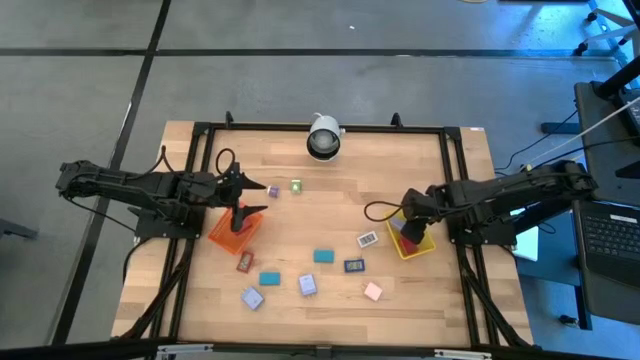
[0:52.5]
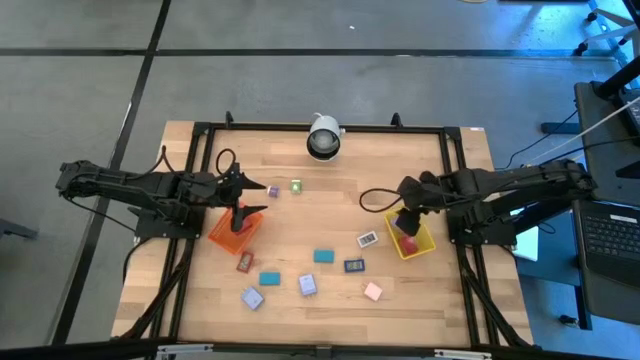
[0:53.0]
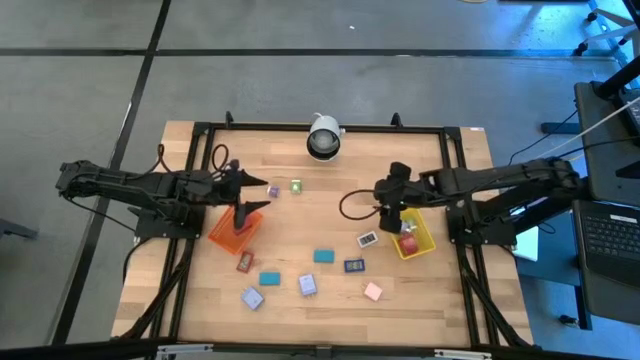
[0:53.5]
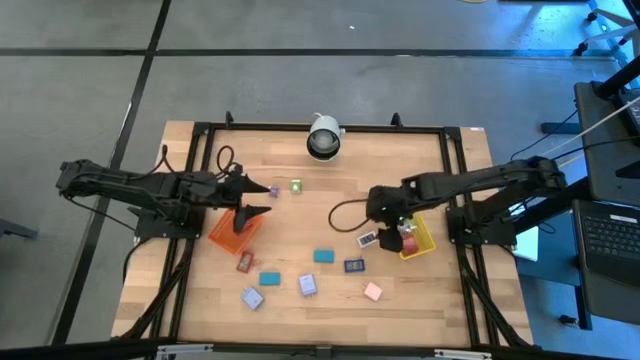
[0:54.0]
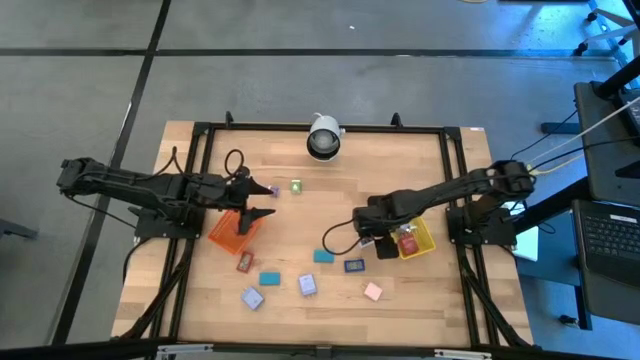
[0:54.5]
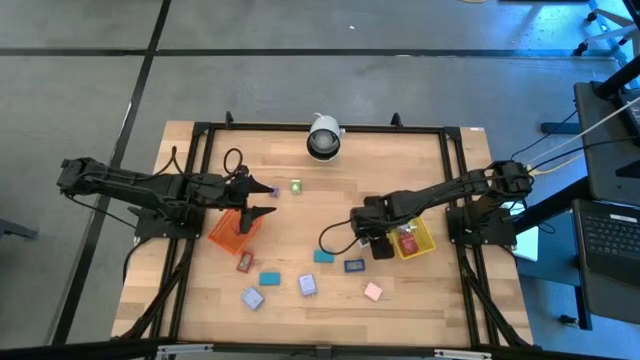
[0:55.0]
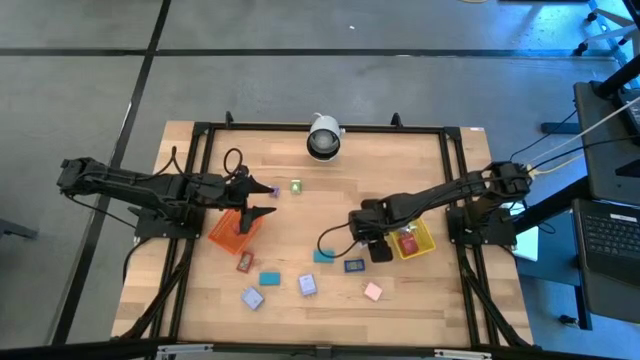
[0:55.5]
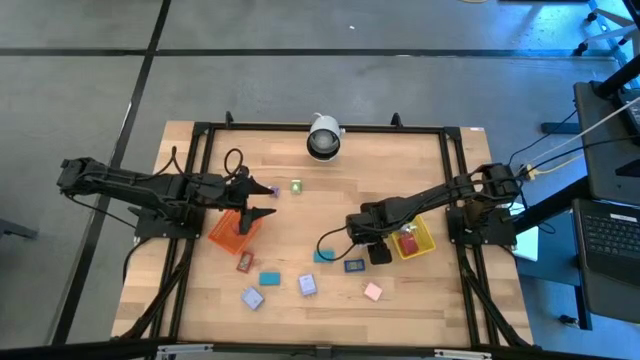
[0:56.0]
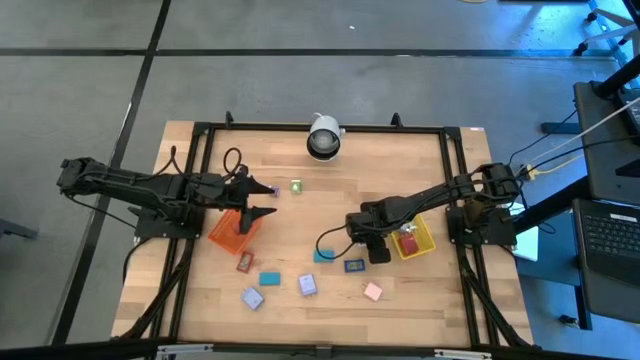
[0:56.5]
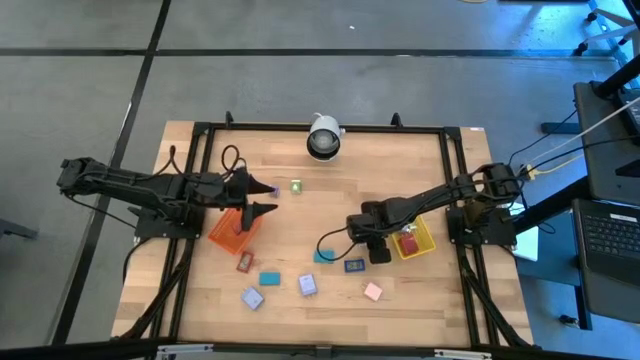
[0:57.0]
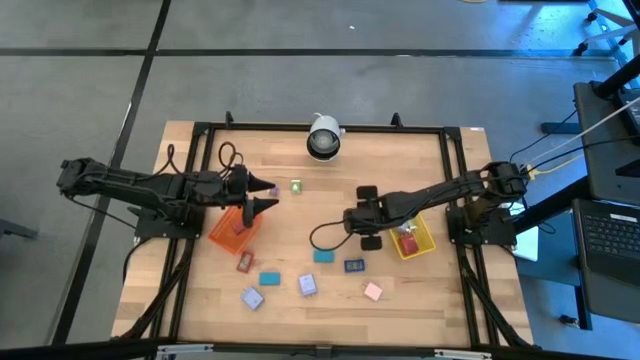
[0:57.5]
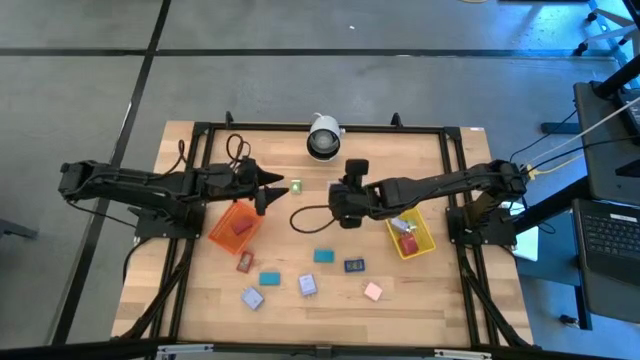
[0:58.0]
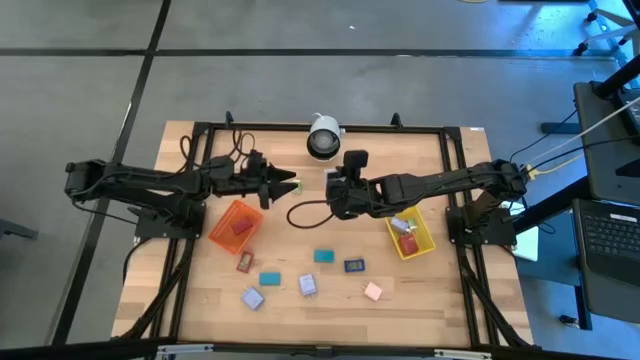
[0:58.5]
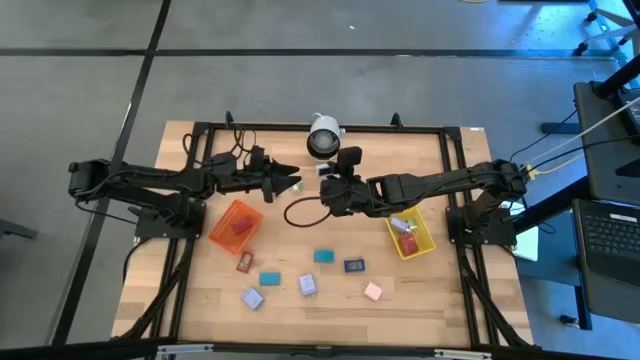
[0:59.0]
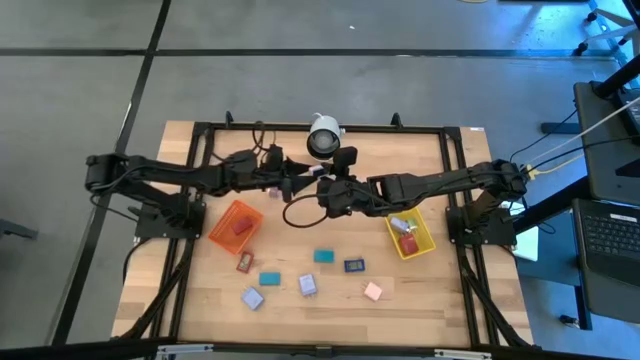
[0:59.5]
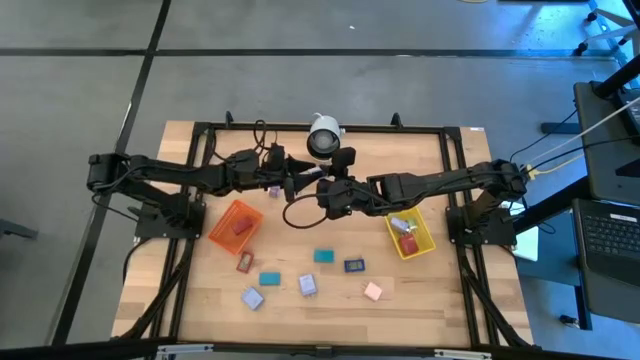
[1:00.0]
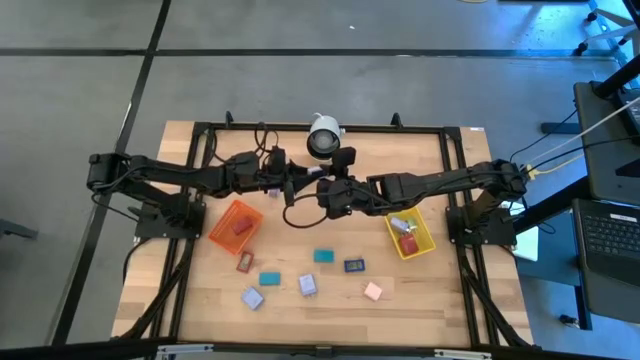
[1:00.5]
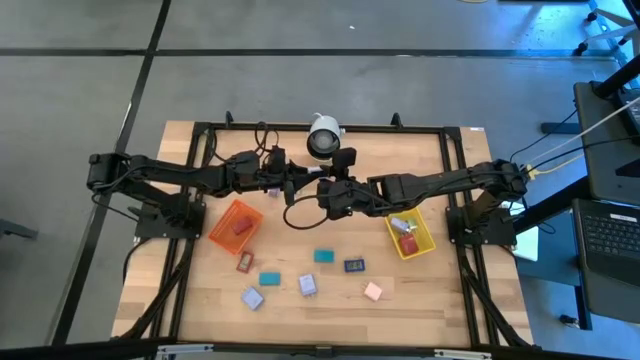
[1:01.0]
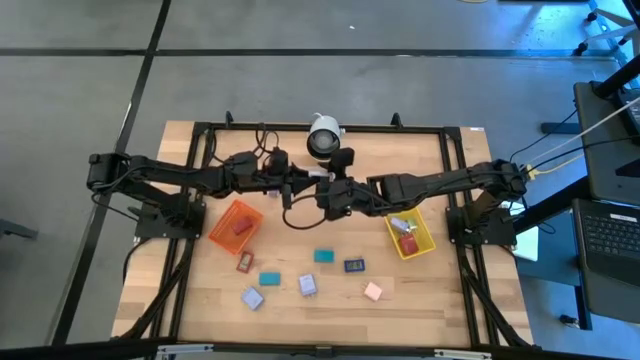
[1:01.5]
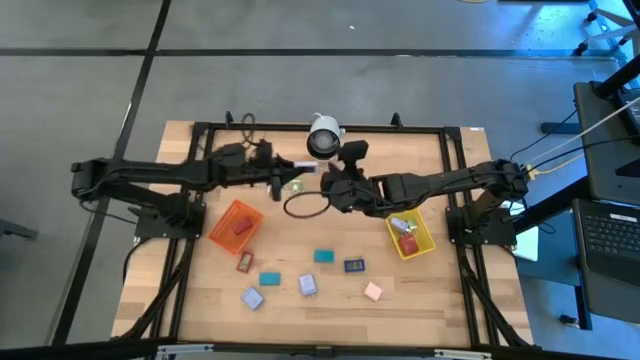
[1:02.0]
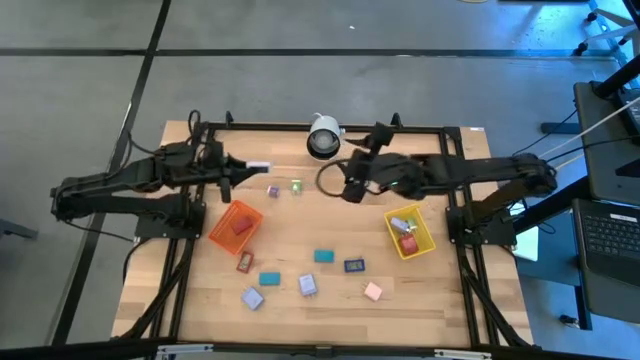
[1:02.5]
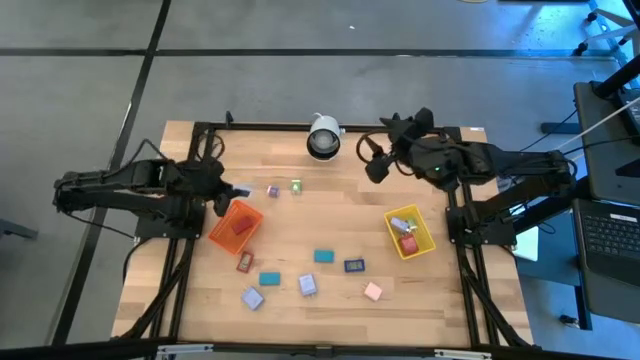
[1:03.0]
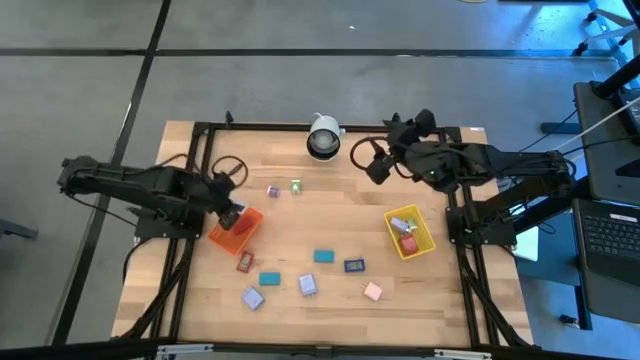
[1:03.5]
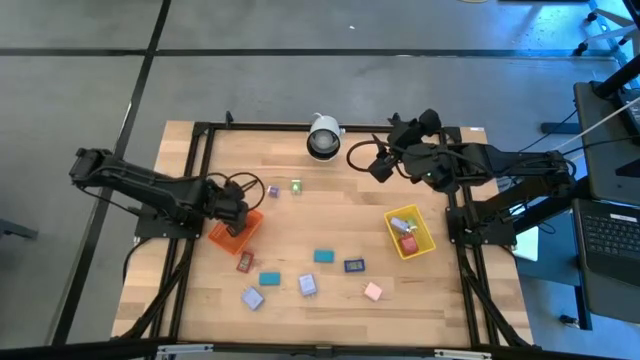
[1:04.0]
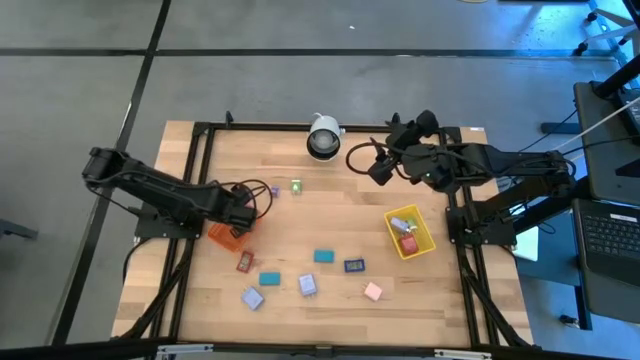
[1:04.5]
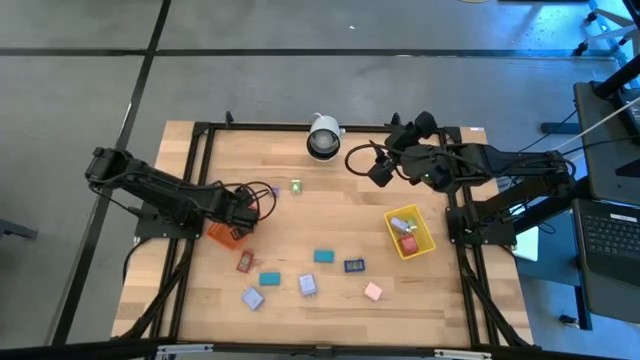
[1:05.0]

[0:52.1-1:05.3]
Task: Pick & Place Office items
Put the white digital clock into the orange basket

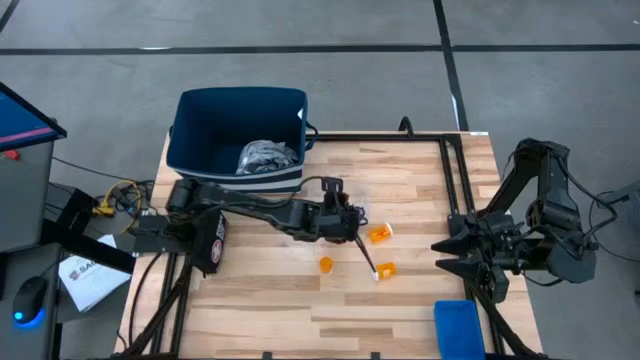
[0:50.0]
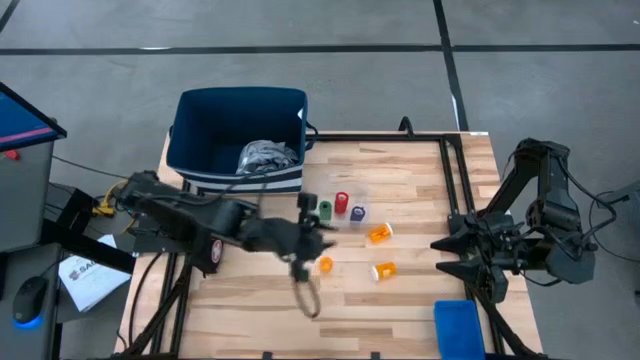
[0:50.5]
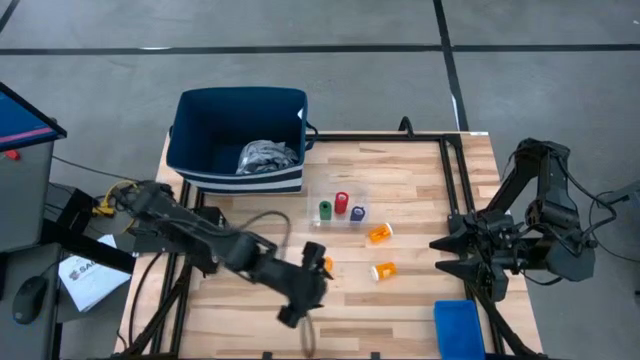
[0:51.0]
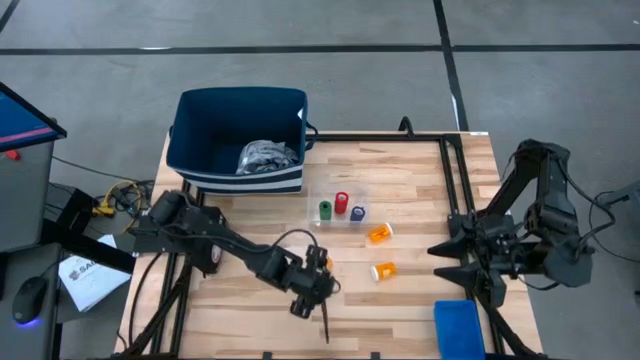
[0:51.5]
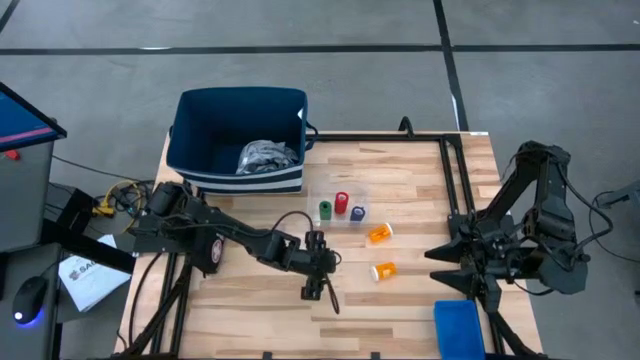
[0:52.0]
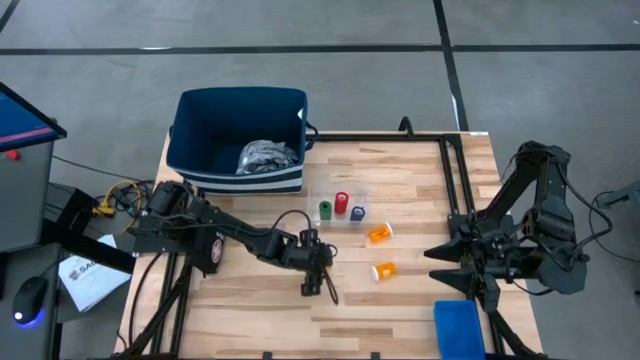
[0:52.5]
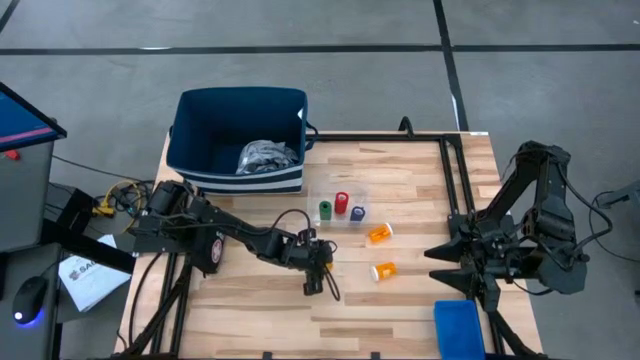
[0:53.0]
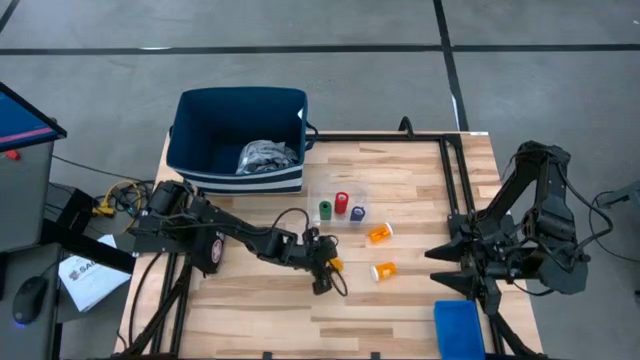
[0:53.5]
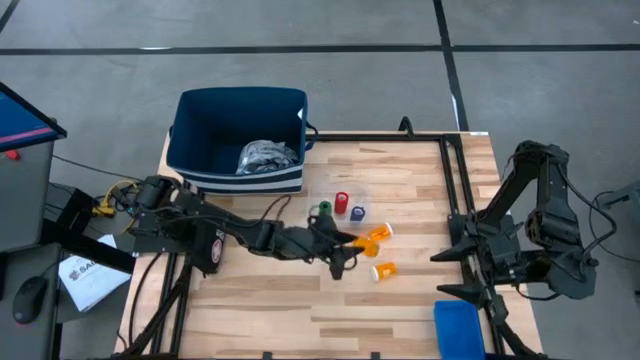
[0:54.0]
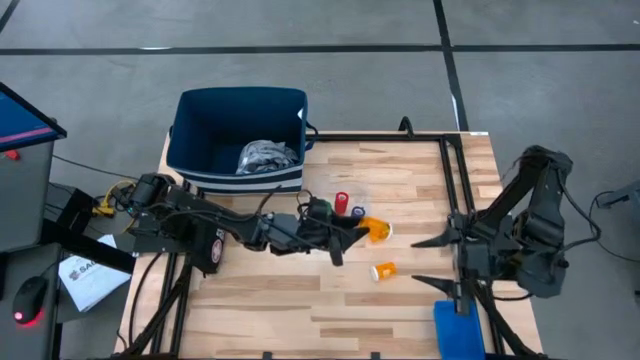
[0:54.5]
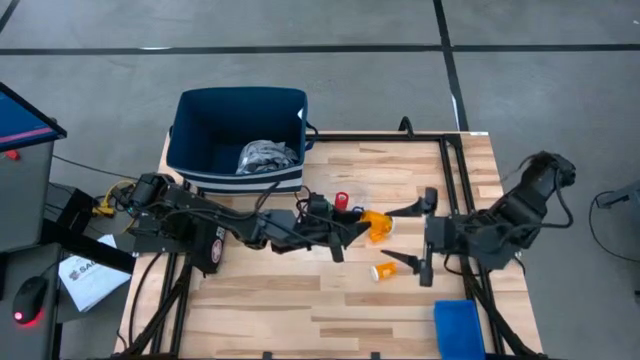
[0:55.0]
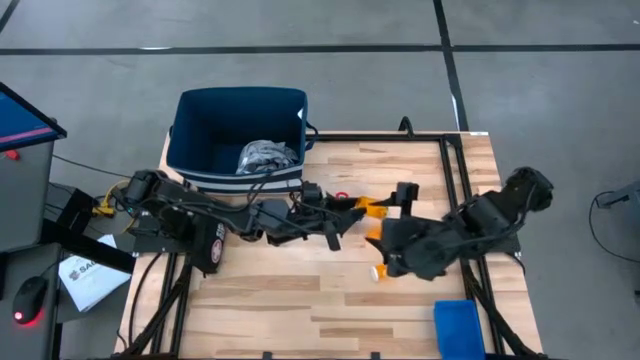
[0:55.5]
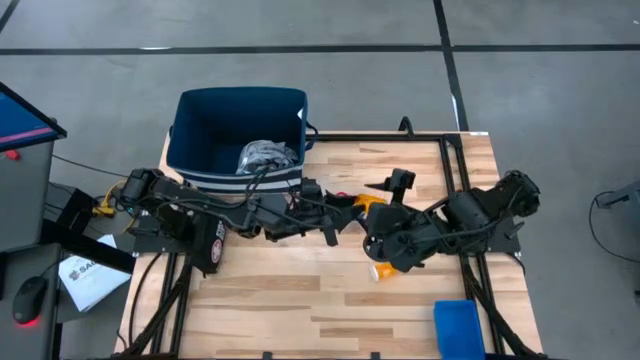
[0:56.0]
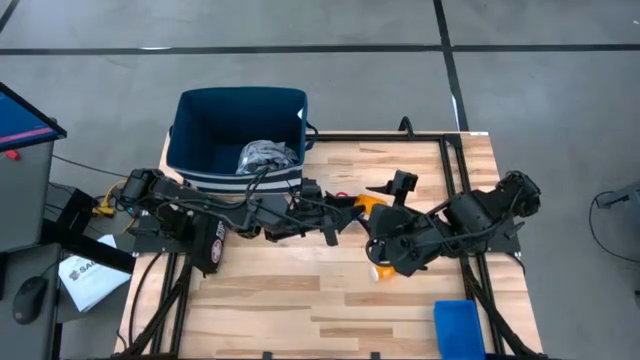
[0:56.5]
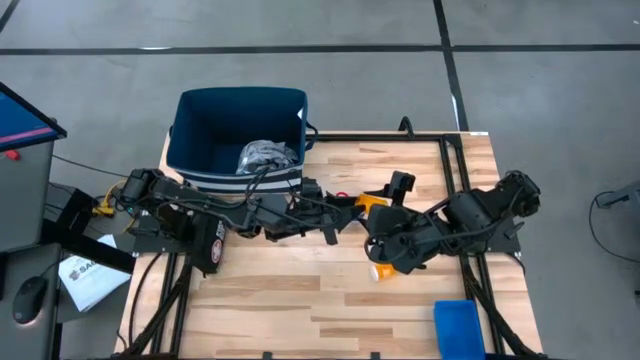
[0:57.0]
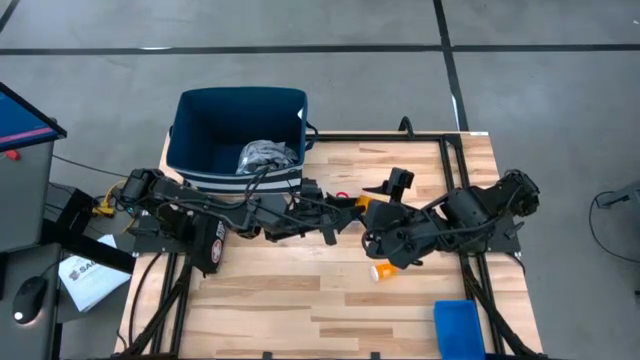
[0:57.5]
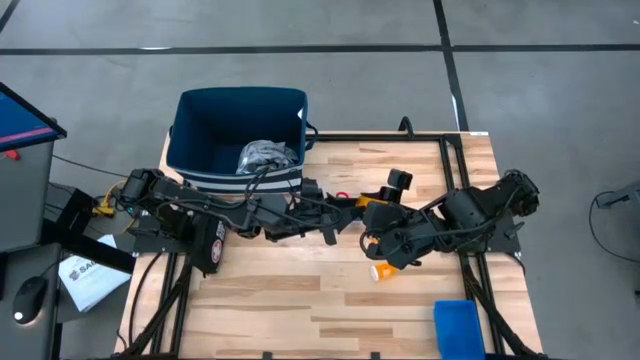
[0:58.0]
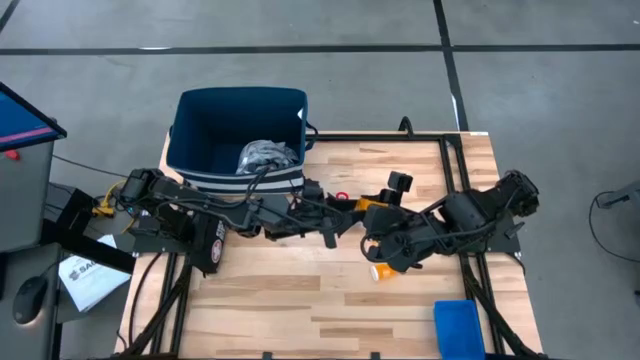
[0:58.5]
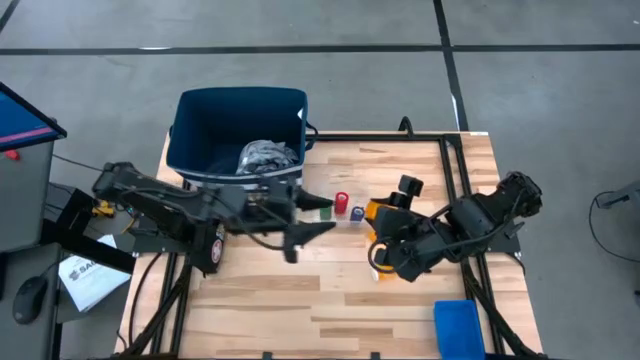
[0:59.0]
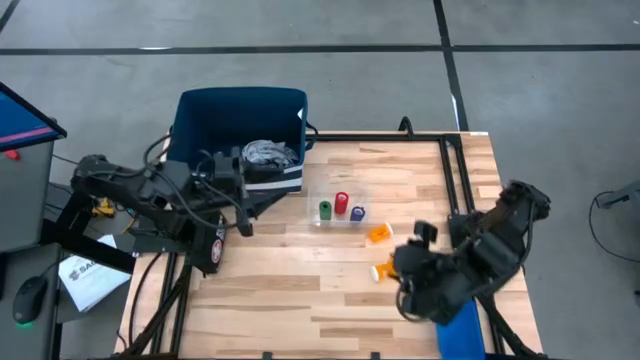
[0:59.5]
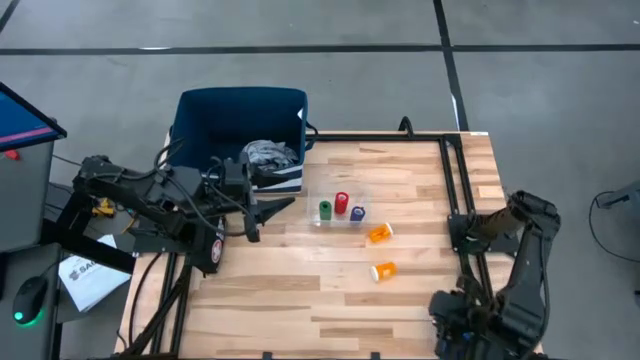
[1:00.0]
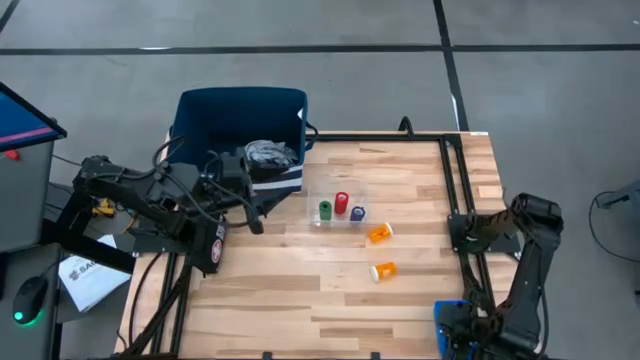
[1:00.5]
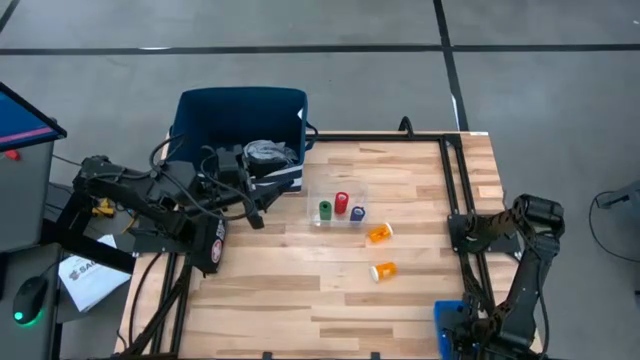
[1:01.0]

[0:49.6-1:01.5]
Task: Pick & place medical supplies in basket/bin
Put the bottom left orange pill bottle into the blue basket
